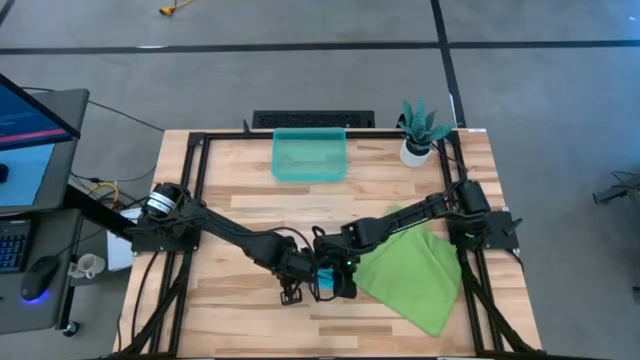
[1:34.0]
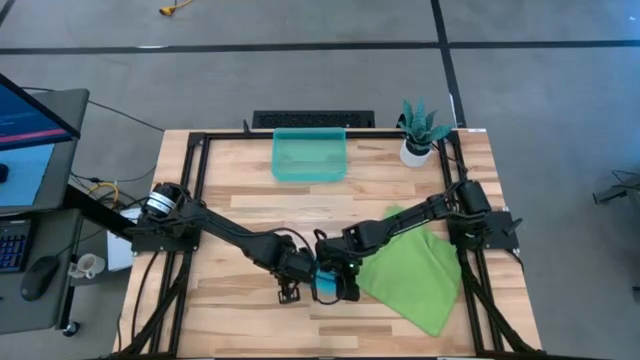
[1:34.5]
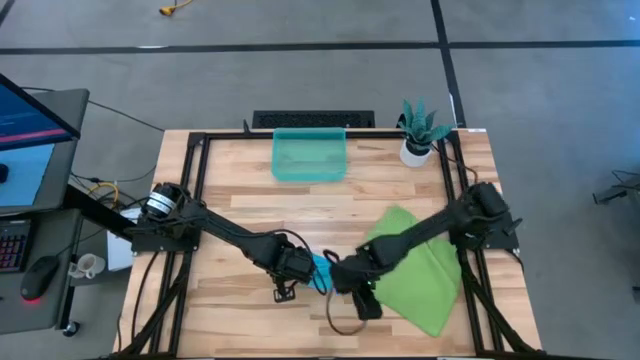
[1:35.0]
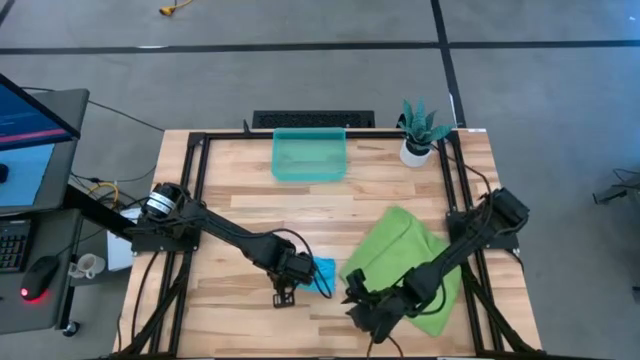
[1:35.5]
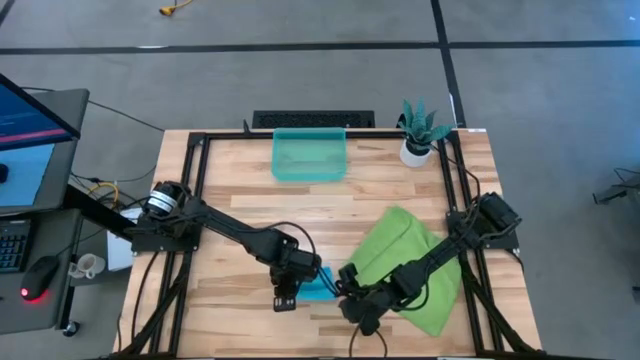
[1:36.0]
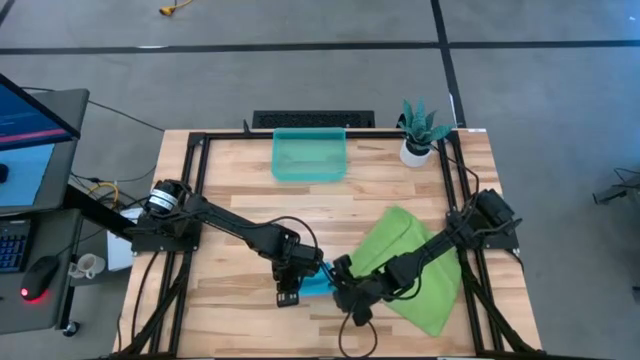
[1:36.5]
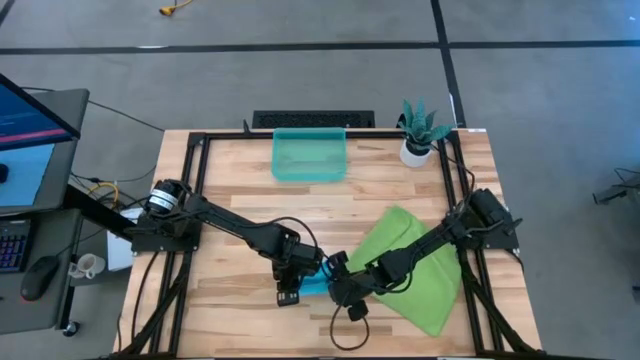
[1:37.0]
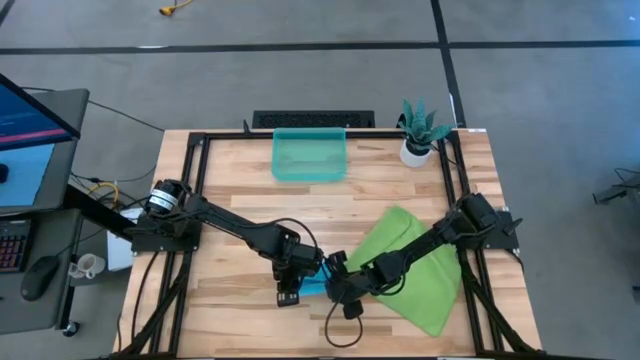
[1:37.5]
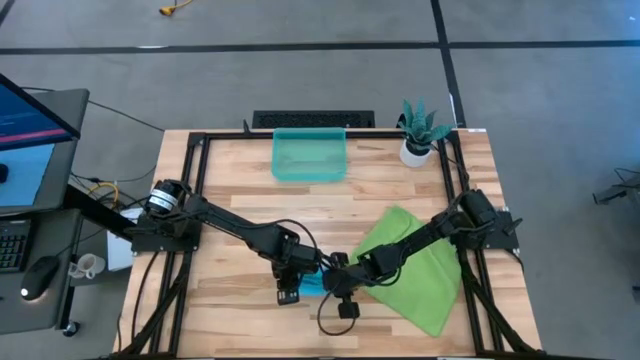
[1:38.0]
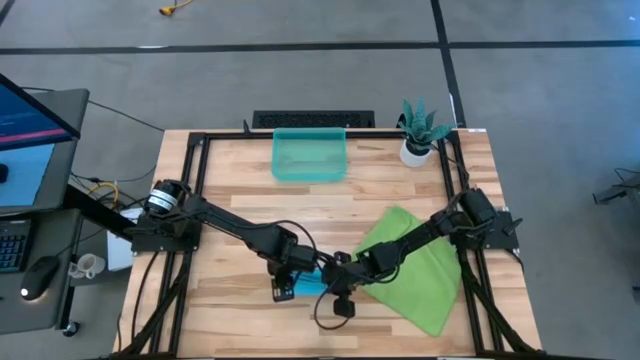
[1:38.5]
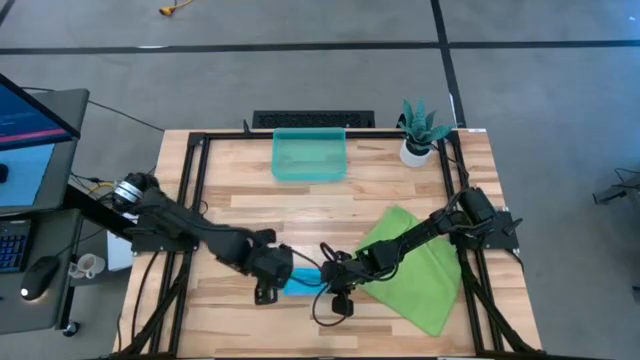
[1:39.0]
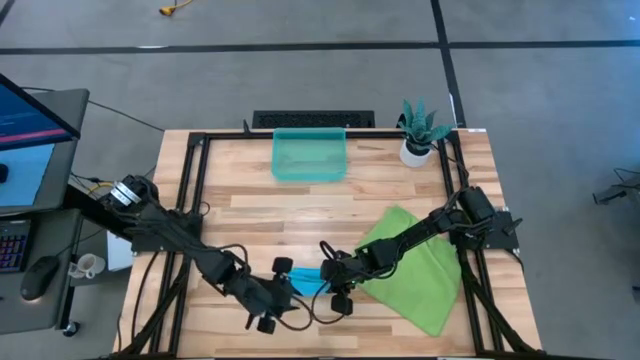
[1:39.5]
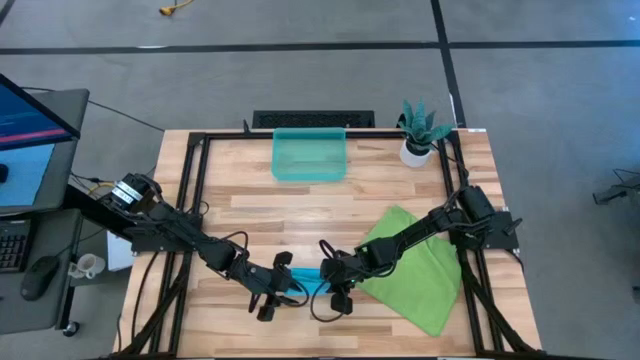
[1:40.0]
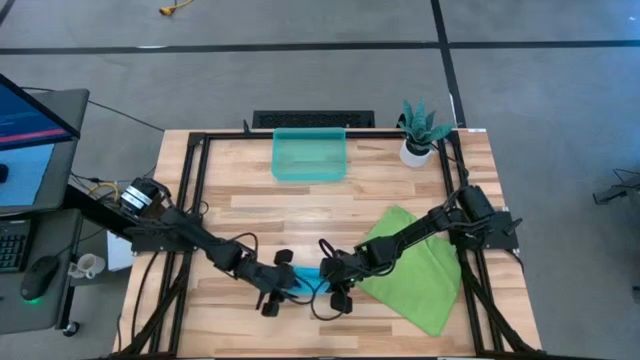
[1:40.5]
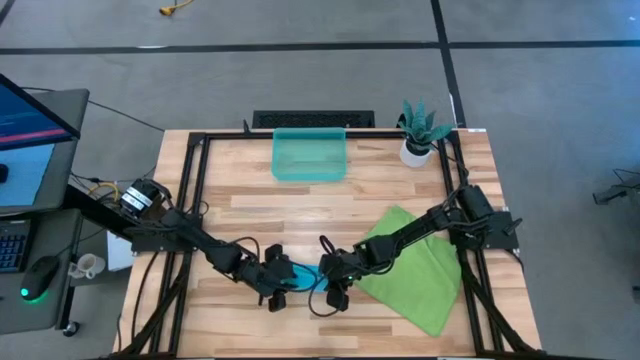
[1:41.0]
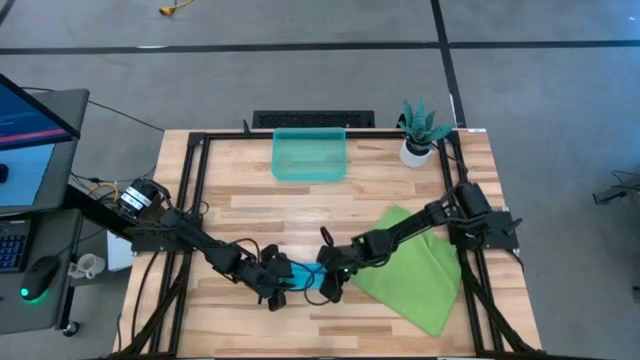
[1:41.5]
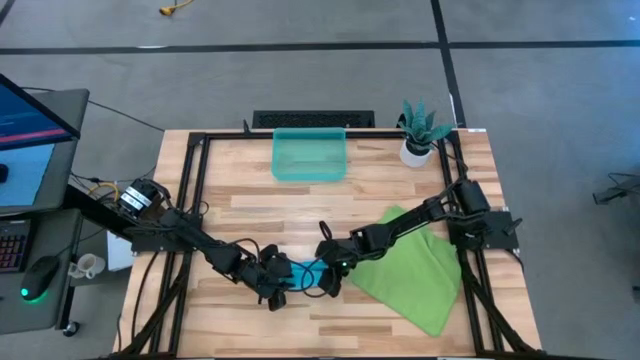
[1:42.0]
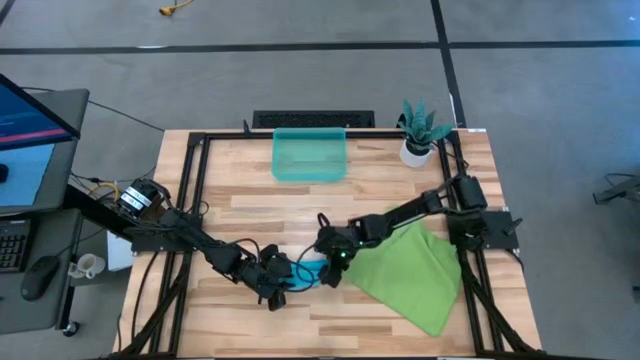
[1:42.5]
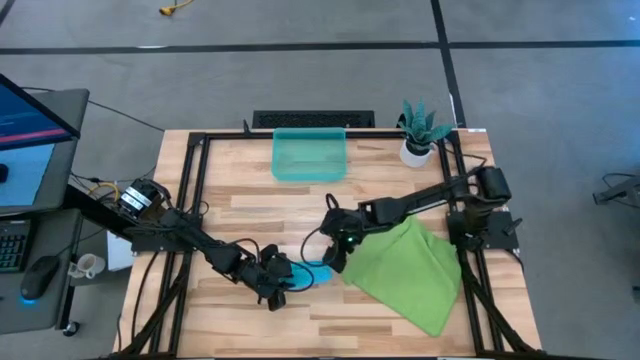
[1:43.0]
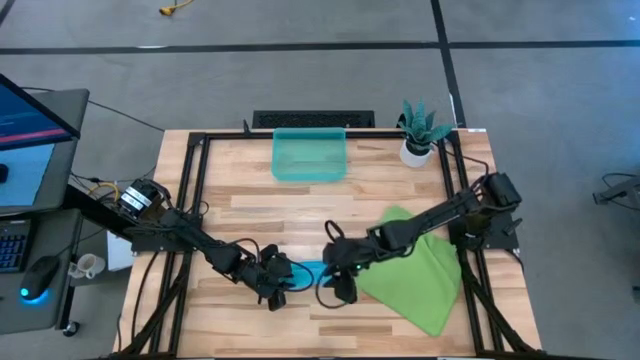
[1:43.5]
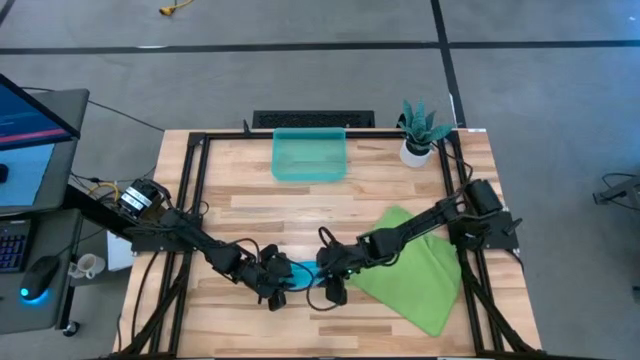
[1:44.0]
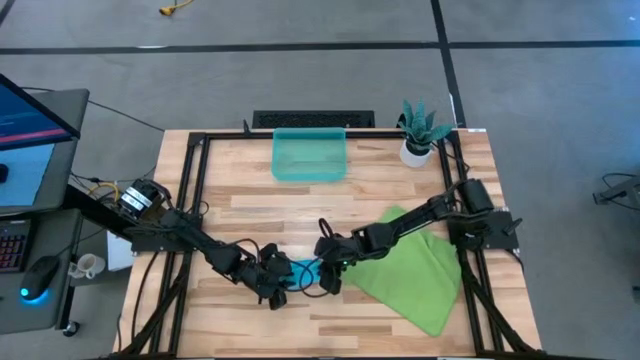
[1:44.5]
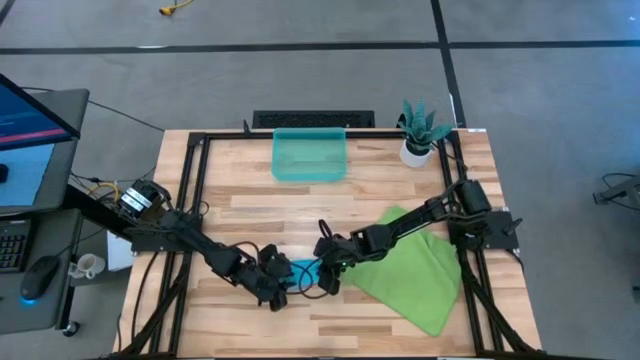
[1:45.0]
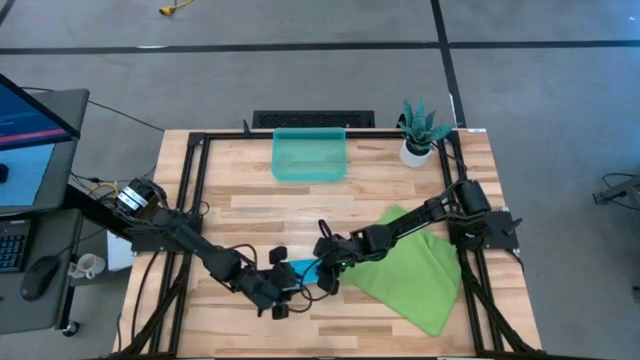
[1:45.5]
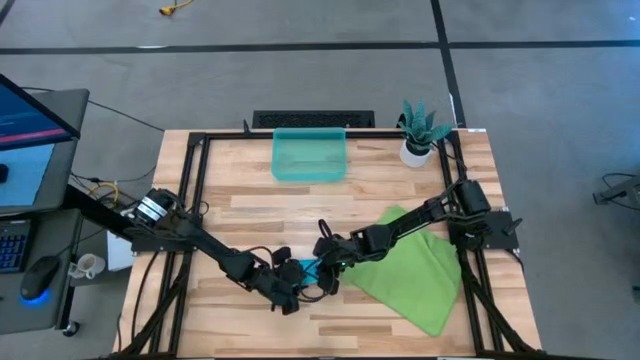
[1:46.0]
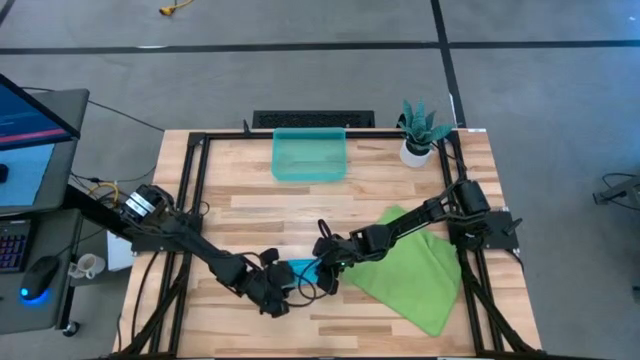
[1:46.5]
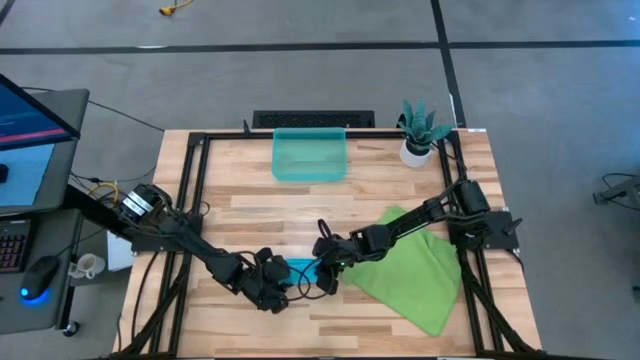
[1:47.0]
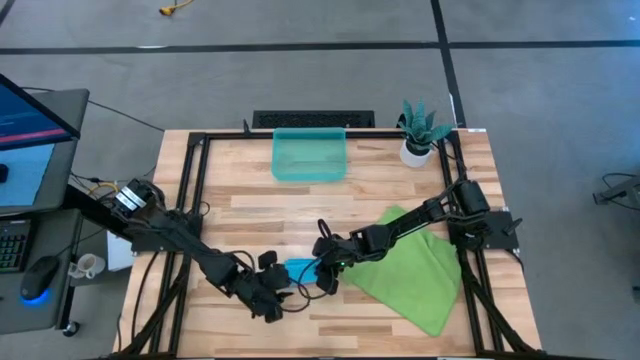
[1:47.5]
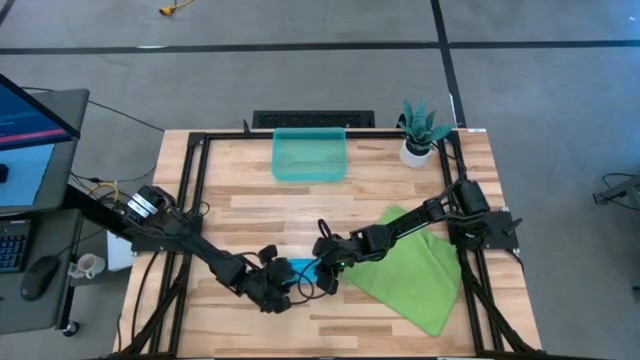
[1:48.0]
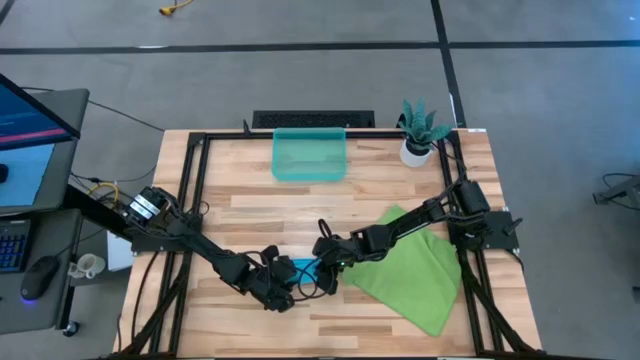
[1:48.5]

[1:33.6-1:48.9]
Task: Roll microfiber towels into tight, uniform cylinder then place into a basket
Roll the blue microfiber cloth

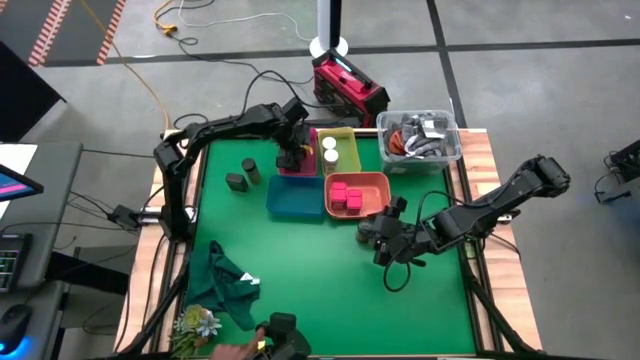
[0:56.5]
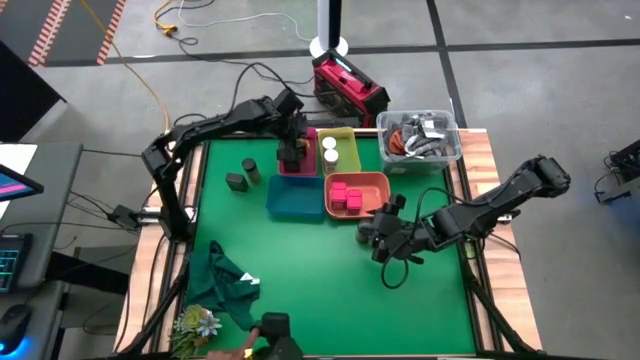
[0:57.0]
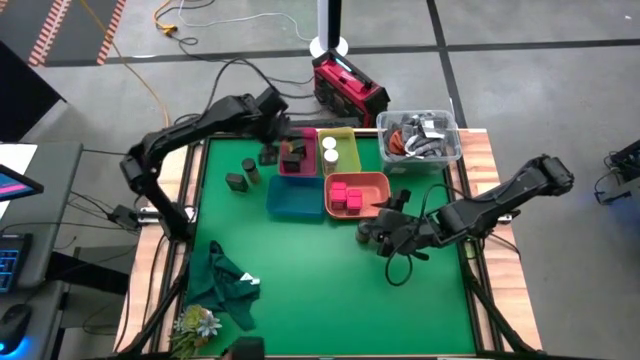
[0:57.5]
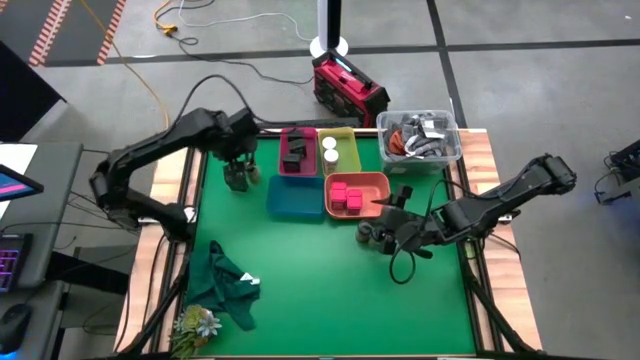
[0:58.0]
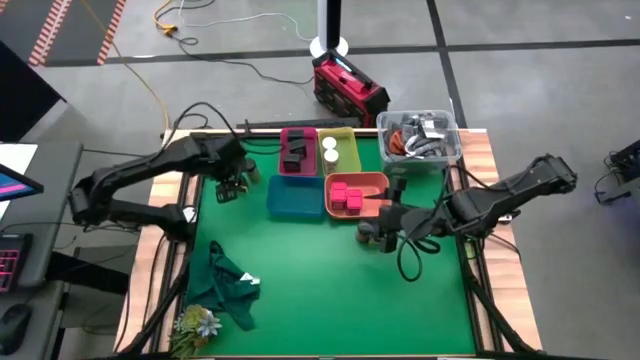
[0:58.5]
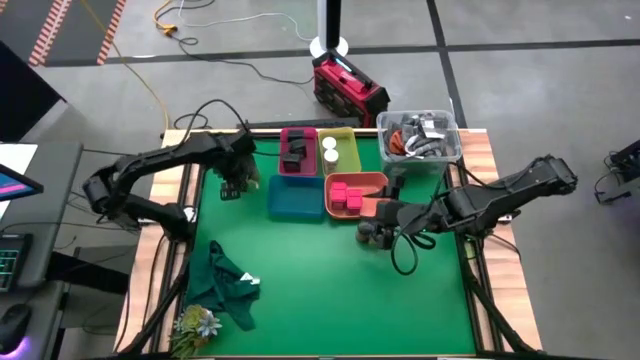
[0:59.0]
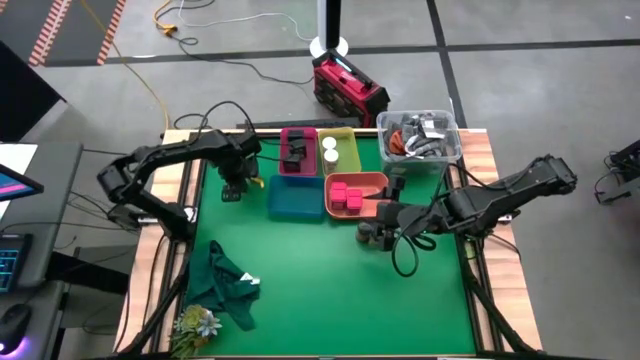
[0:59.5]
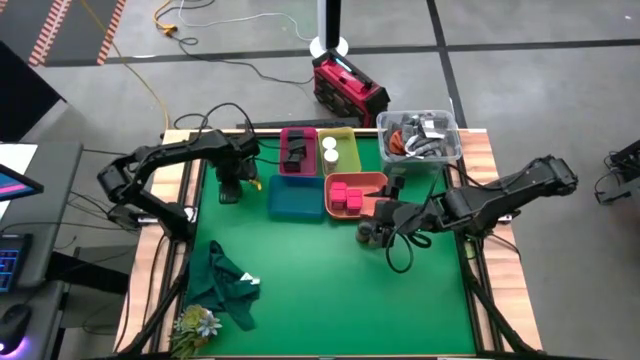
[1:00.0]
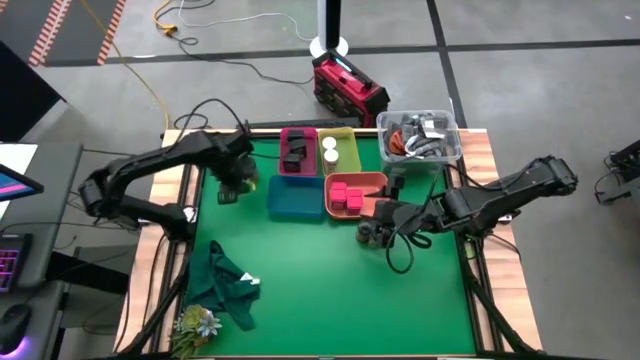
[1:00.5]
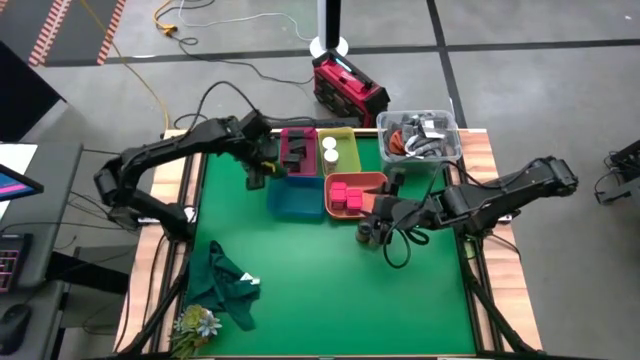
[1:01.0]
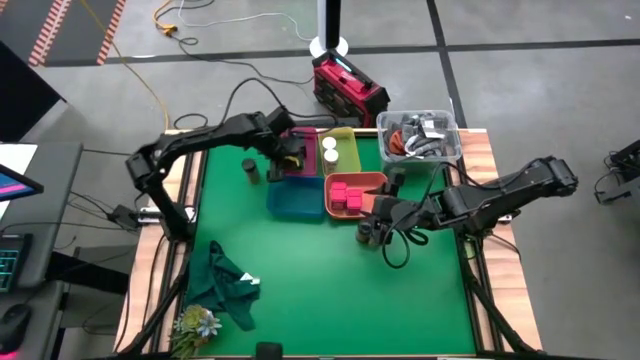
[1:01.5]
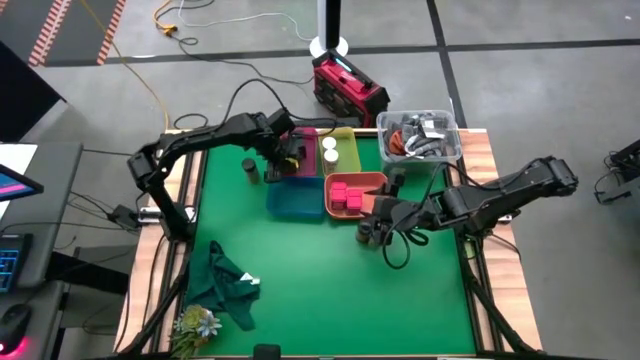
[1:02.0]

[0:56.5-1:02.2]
Task: Sort spices by type
Put the black seasoning can into the red bin
